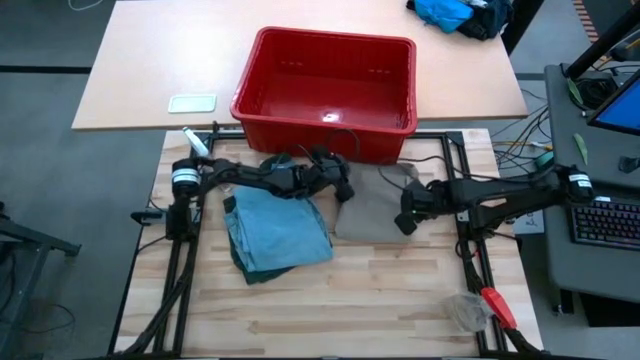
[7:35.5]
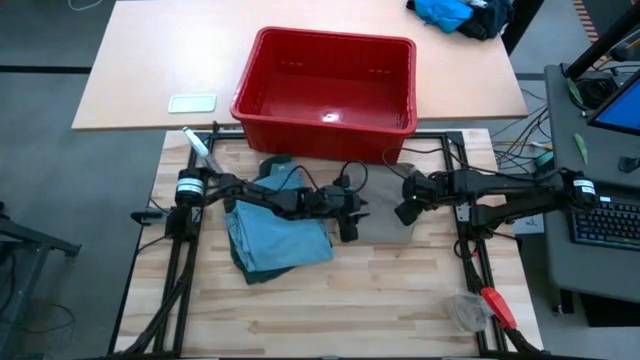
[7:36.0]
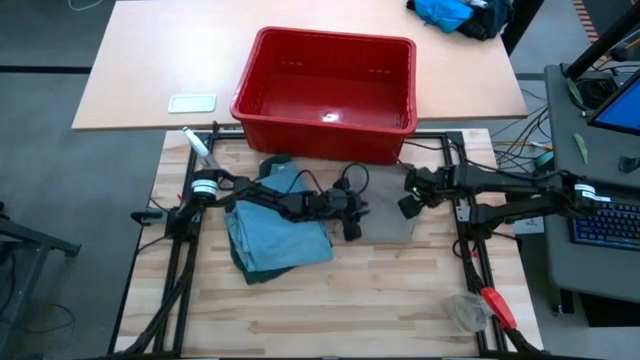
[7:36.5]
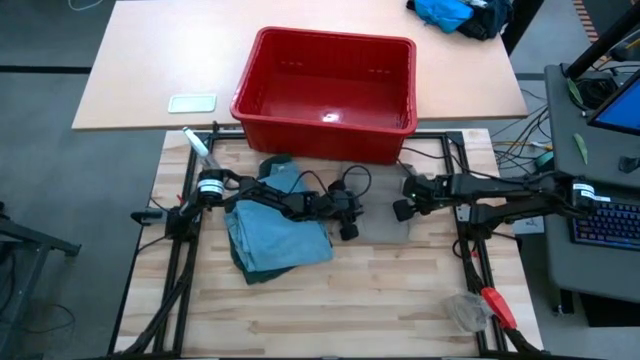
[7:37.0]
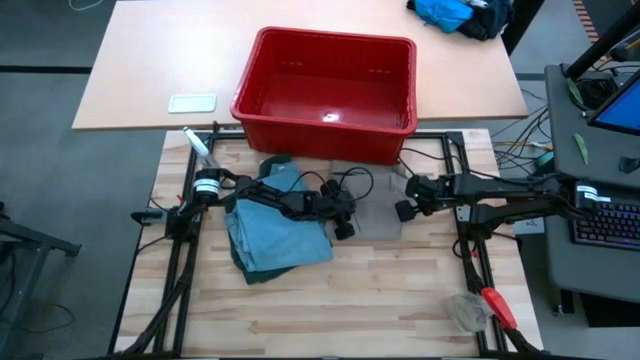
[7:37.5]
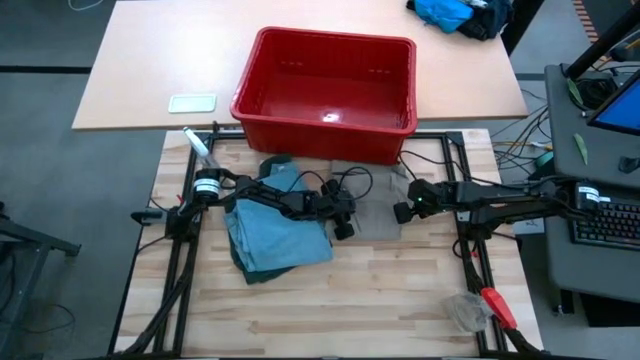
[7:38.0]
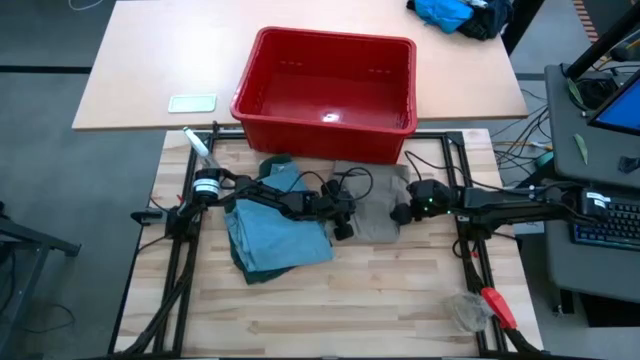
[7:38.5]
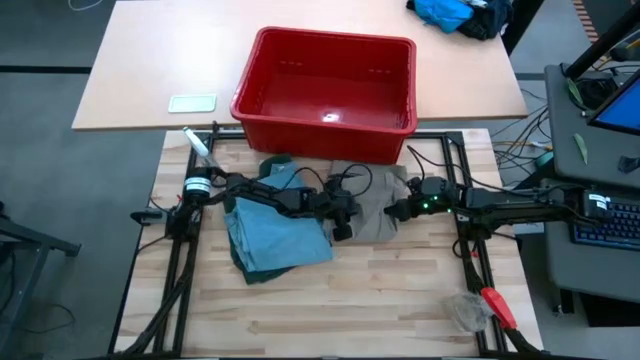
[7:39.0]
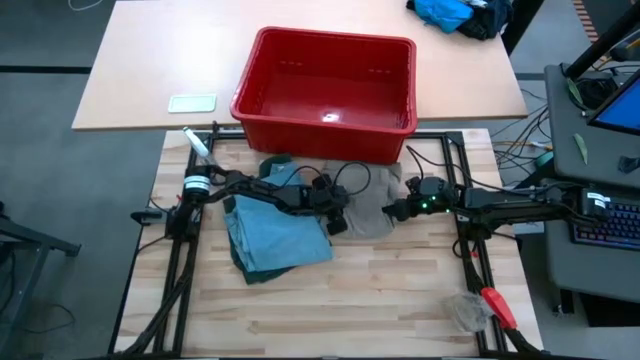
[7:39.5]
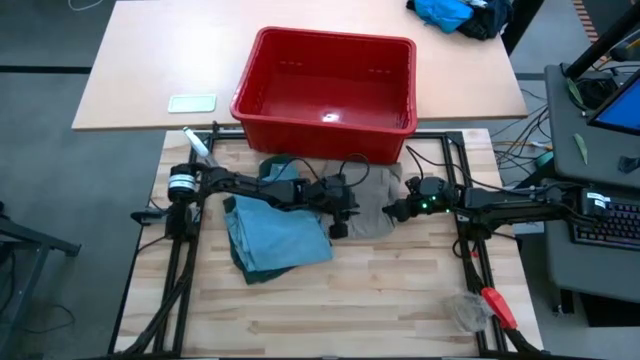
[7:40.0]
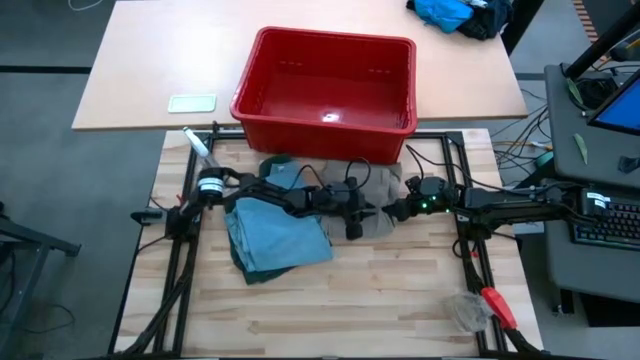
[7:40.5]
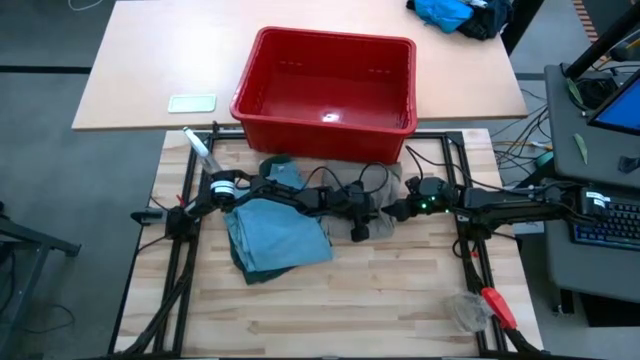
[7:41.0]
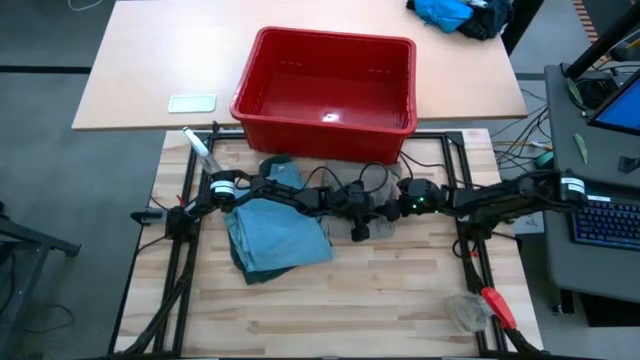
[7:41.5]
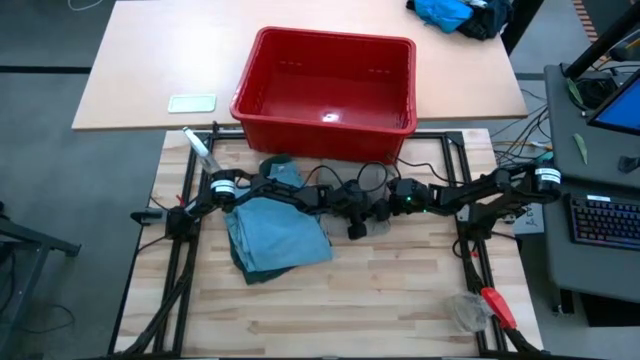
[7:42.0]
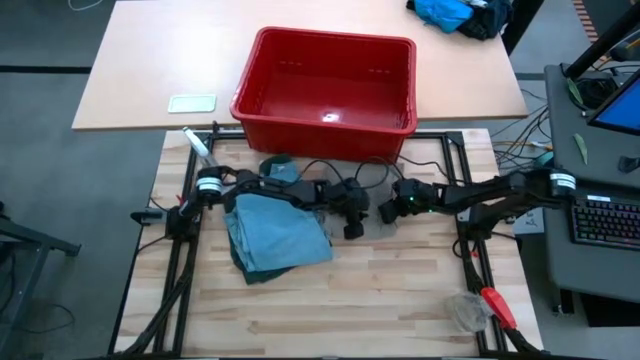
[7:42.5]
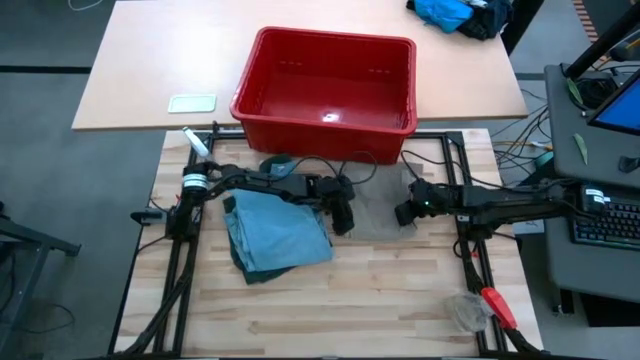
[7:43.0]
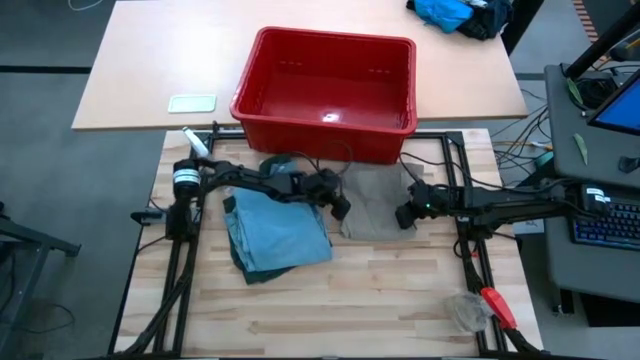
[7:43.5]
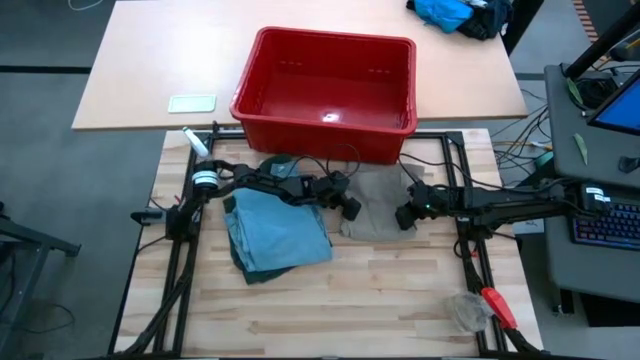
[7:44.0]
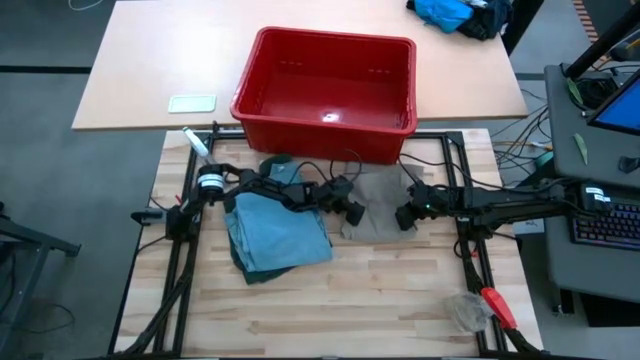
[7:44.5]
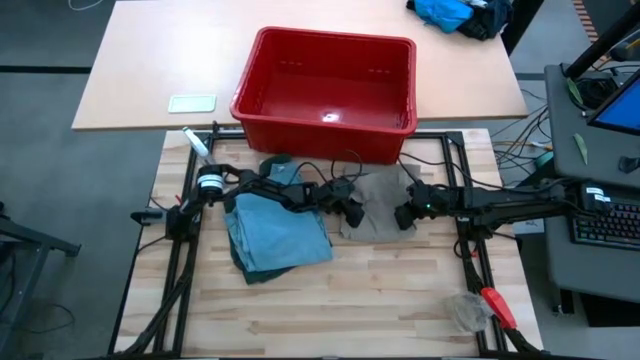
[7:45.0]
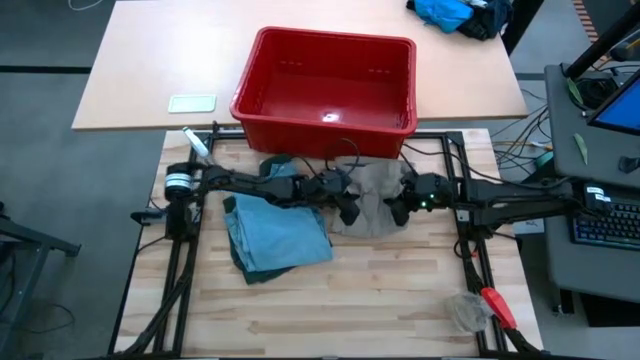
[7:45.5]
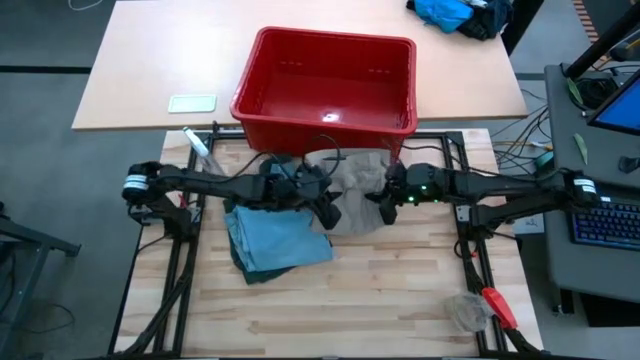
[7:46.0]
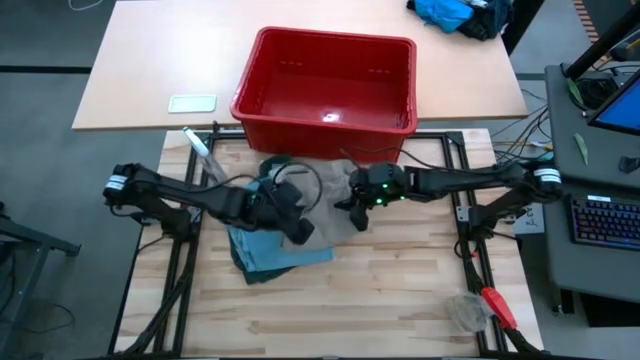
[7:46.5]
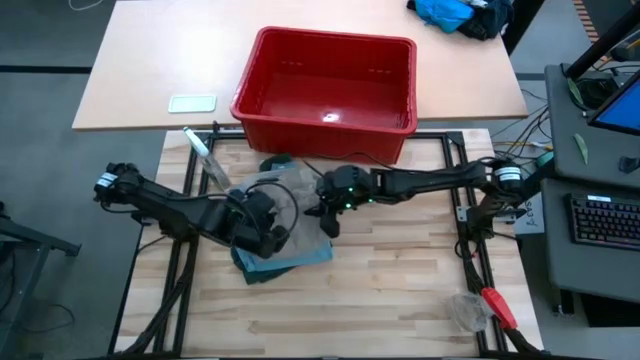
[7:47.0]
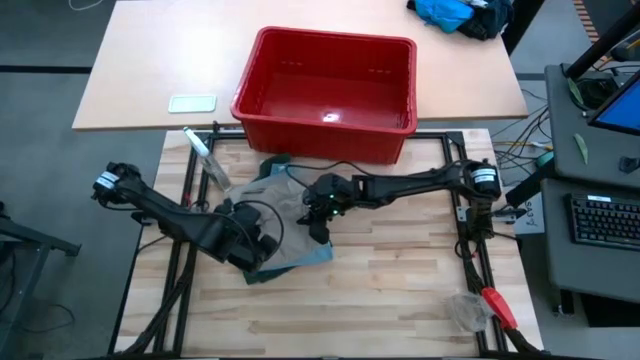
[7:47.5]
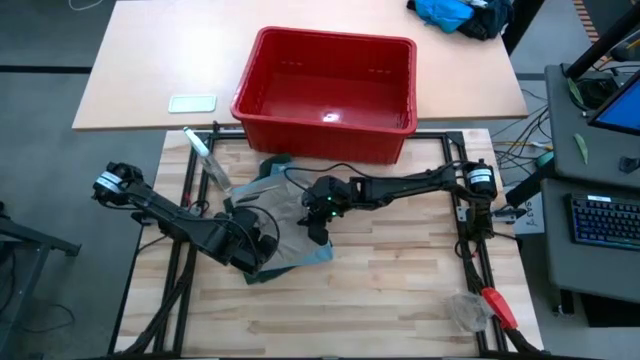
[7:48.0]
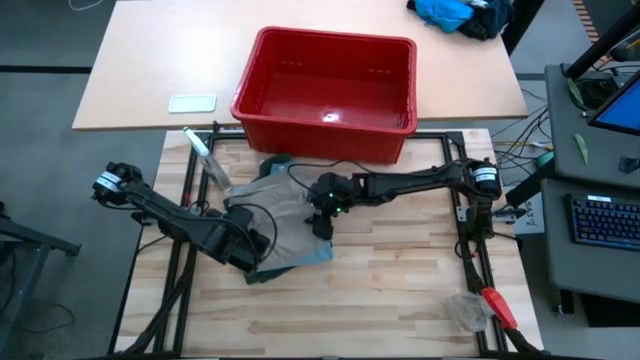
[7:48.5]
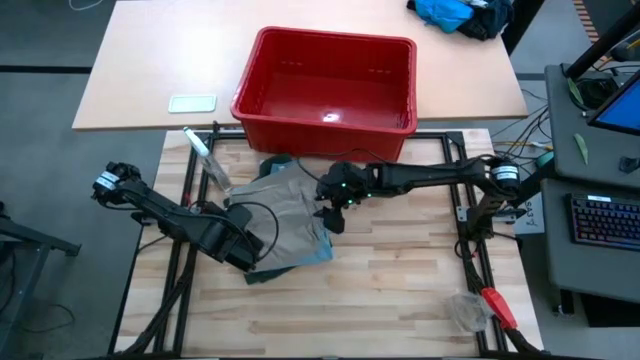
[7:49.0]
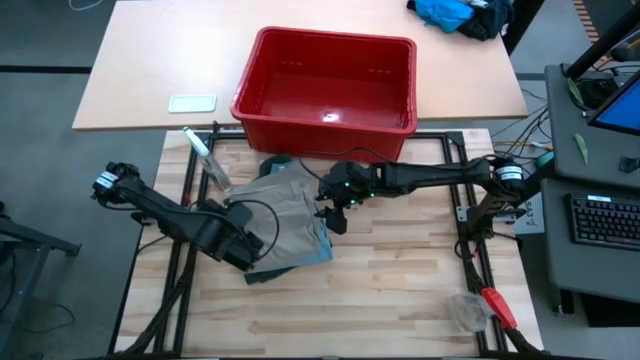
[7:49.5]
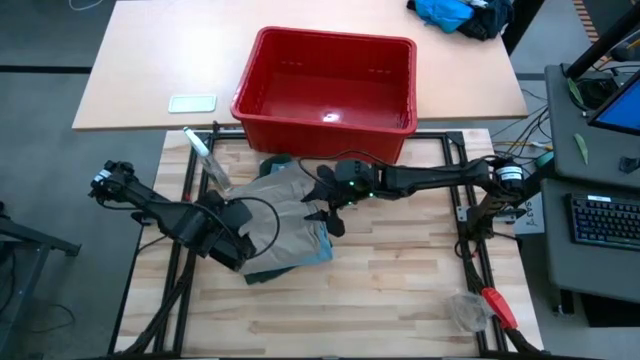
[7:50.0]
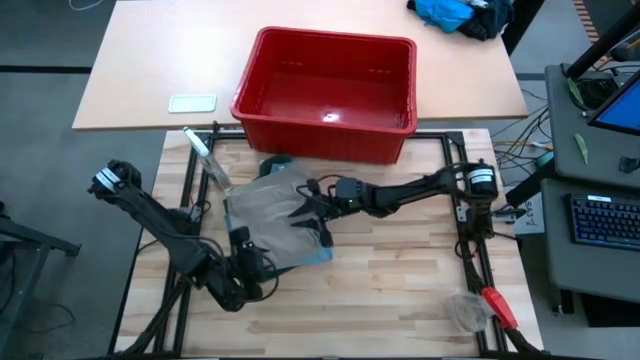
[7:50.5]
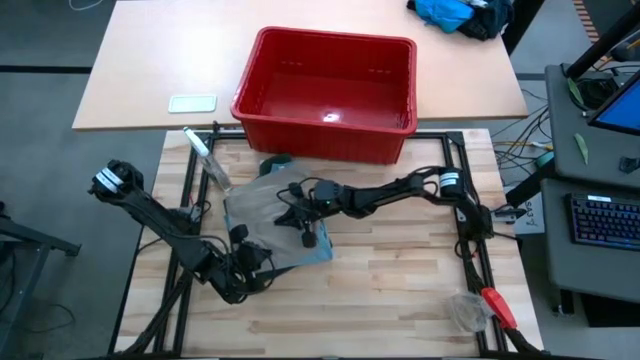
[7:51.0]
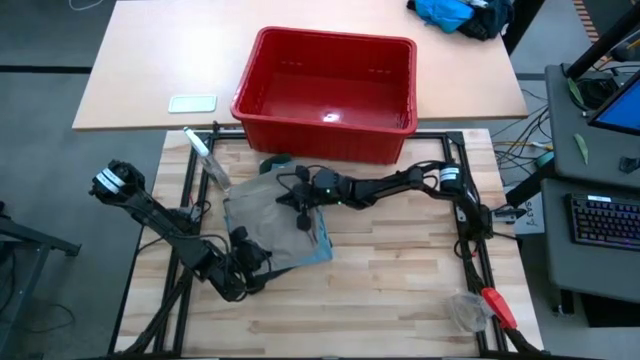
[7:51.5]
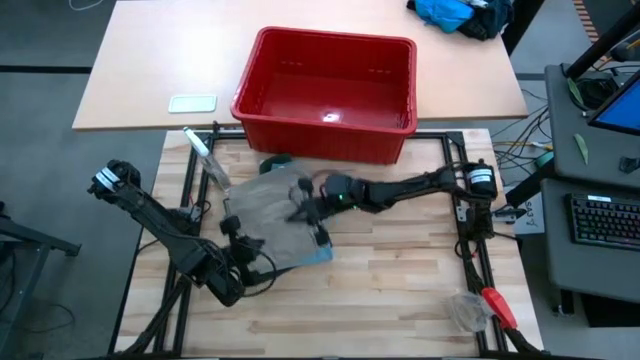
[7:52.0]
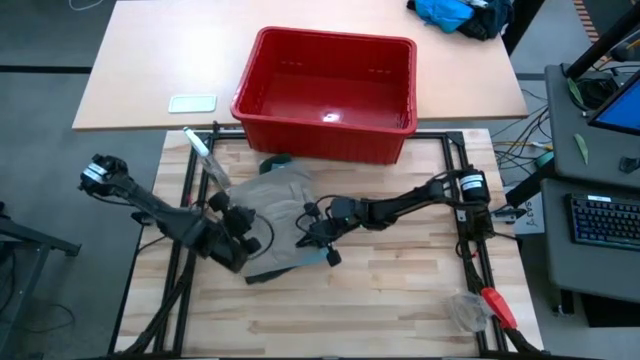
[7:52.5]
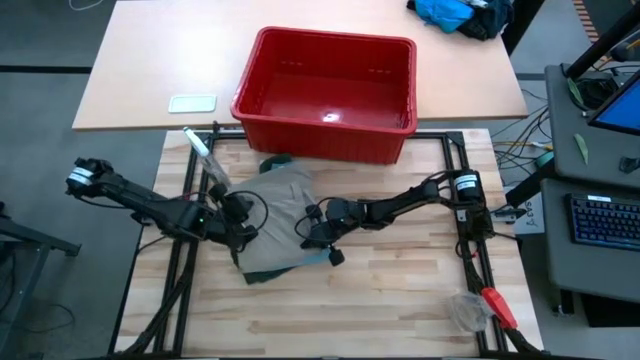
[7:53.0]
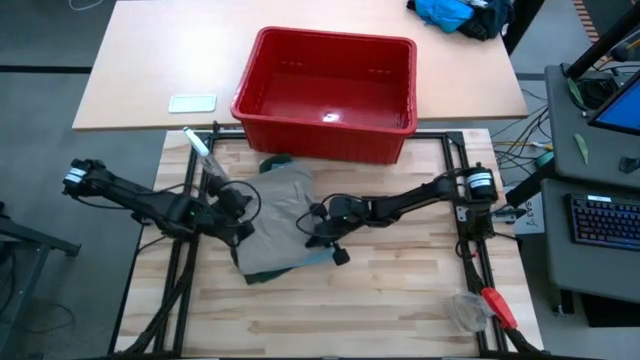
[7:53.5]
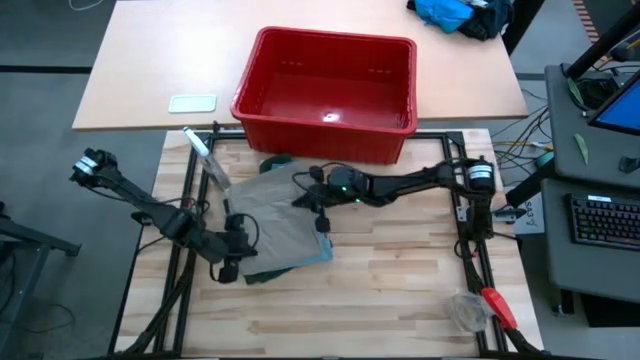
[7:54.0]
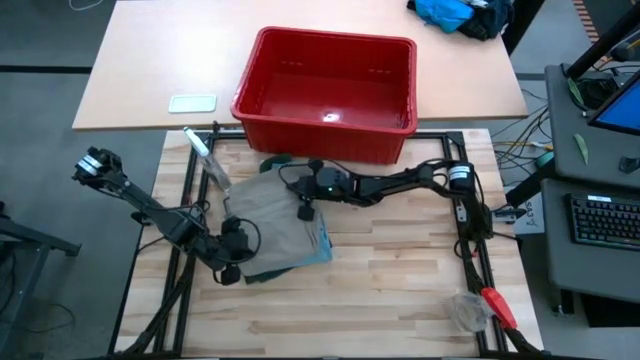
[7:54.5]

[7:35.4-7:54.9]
Task: Fold Laundry from Bin
Stack the light brown shorts on top of the blue jeans

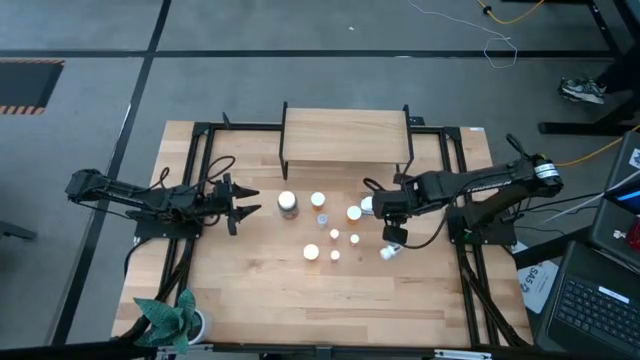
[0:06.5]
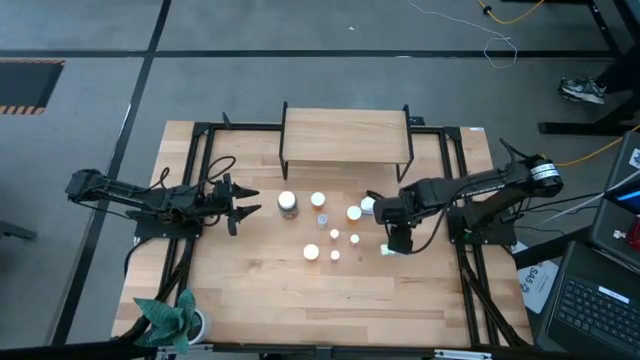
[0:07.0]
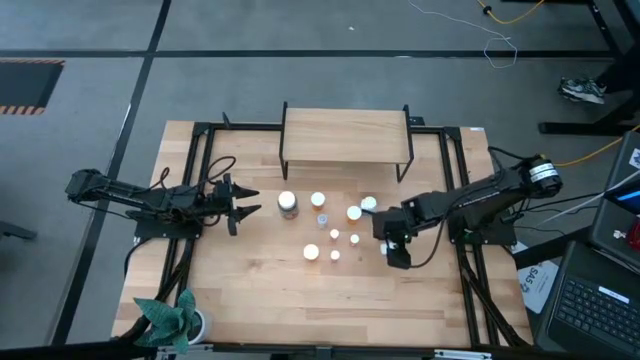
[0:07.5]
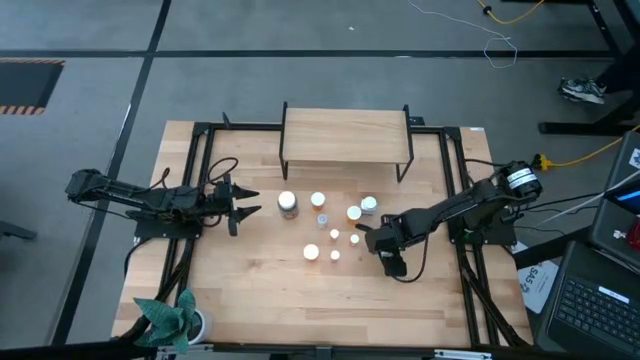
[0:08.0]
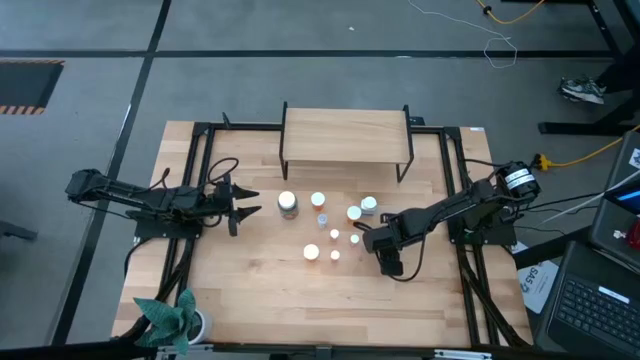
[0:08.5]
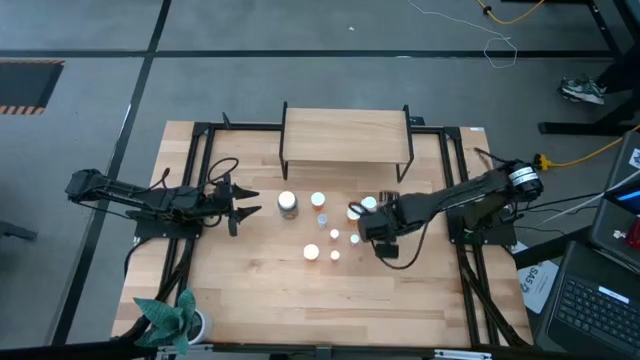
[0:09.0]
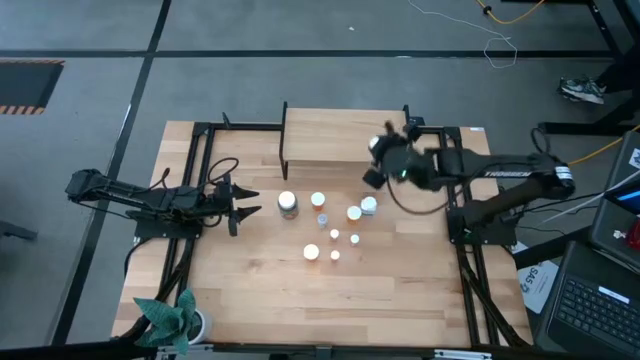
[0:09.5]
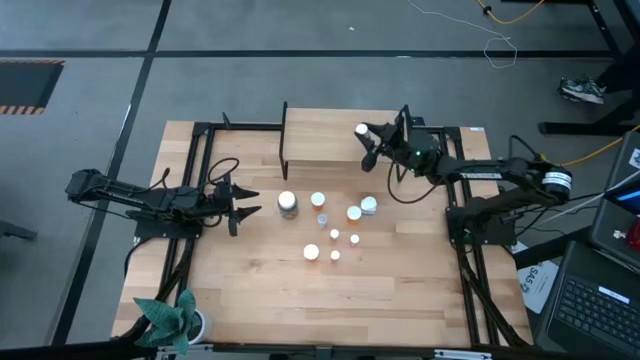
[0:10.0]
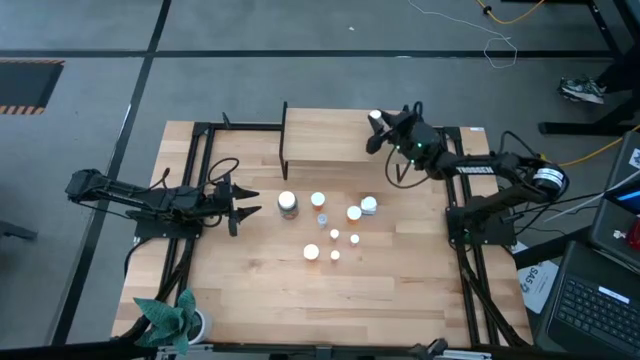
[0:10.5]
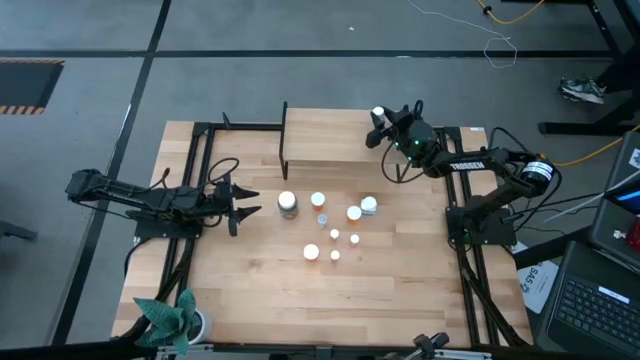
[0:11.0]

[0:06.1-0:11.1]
Task: Pick and place medicine bottles onto shelf by color
Put the bottom white pill bottle on the shelf
